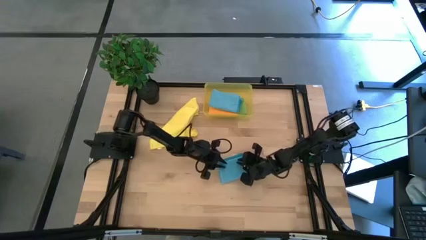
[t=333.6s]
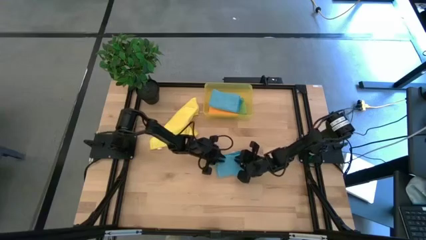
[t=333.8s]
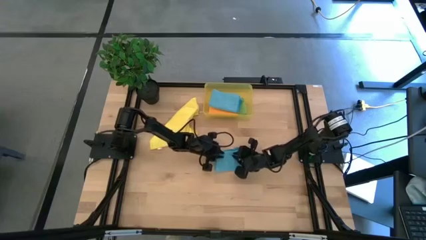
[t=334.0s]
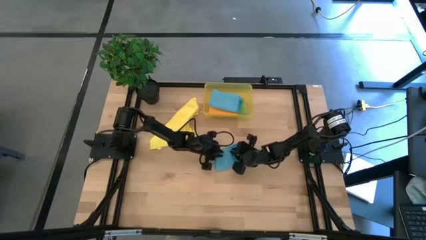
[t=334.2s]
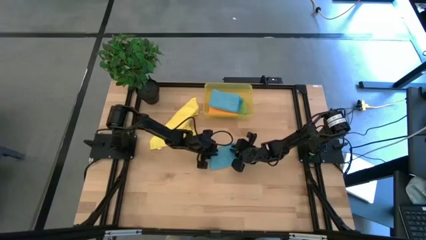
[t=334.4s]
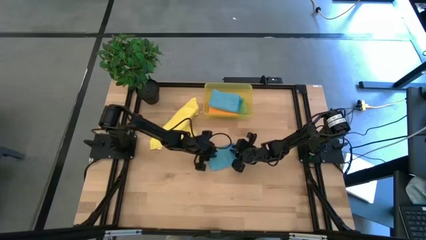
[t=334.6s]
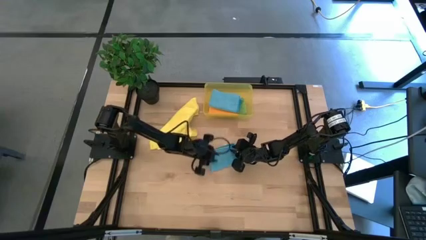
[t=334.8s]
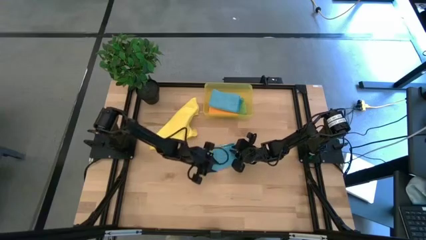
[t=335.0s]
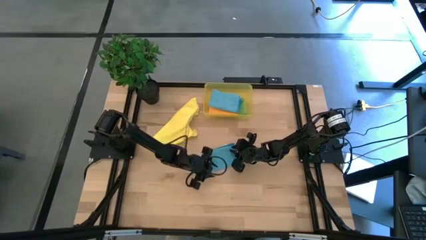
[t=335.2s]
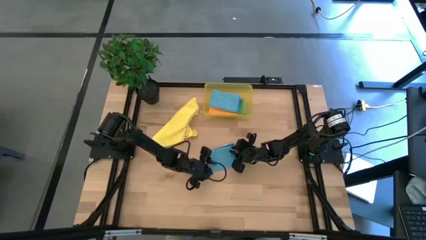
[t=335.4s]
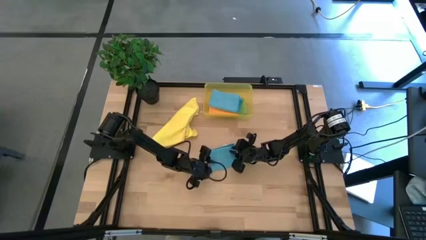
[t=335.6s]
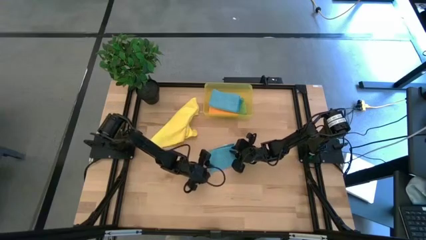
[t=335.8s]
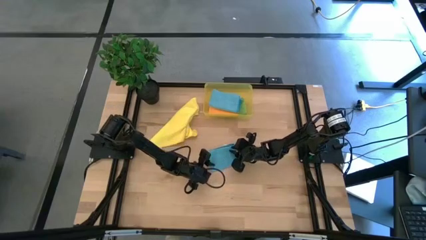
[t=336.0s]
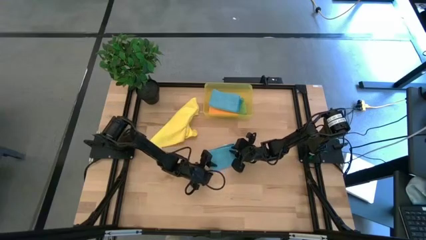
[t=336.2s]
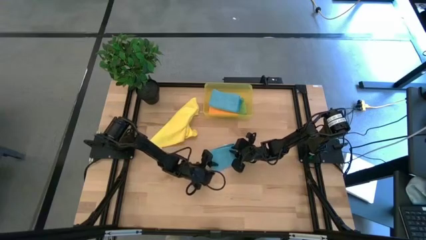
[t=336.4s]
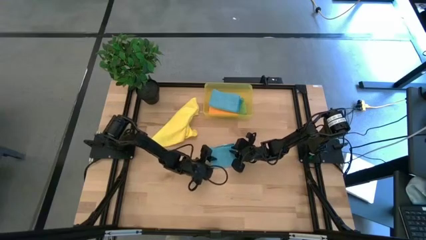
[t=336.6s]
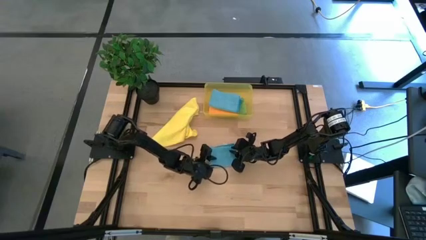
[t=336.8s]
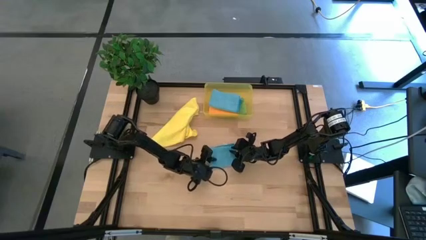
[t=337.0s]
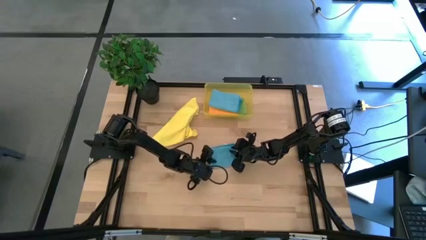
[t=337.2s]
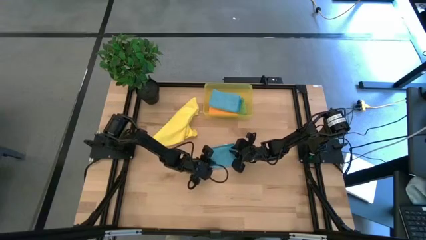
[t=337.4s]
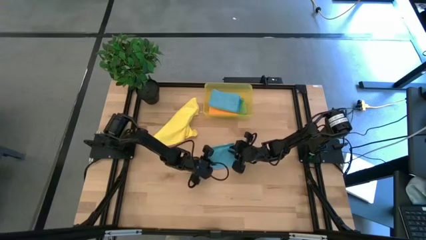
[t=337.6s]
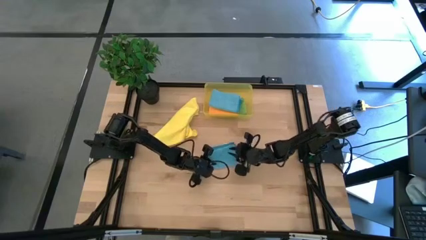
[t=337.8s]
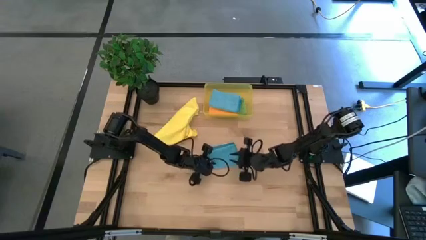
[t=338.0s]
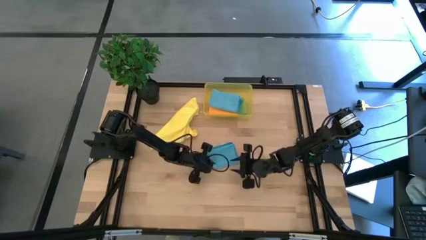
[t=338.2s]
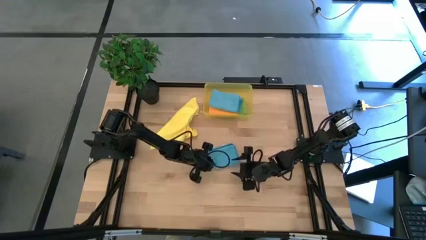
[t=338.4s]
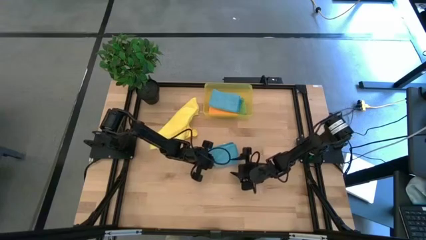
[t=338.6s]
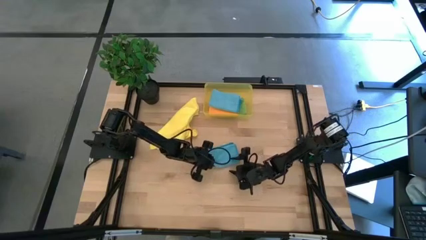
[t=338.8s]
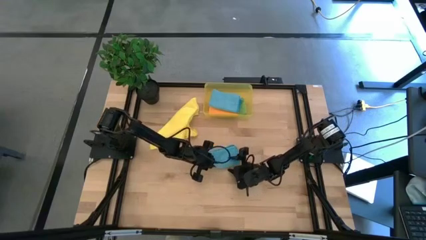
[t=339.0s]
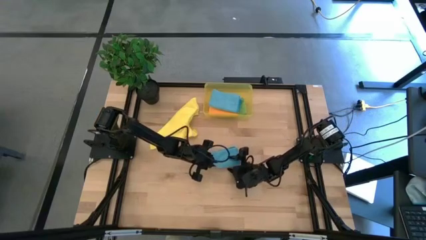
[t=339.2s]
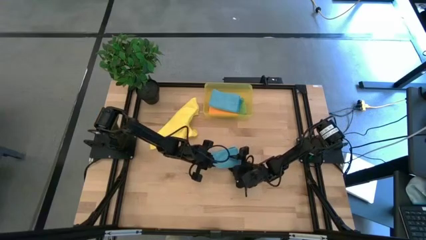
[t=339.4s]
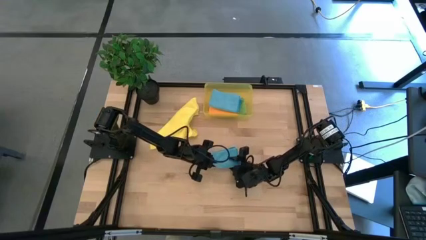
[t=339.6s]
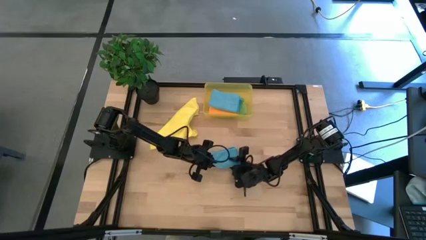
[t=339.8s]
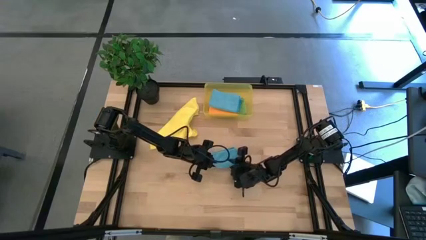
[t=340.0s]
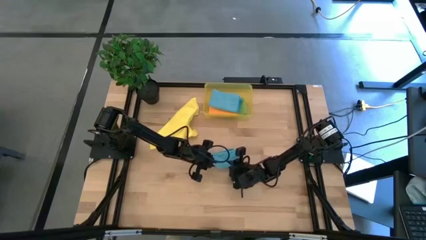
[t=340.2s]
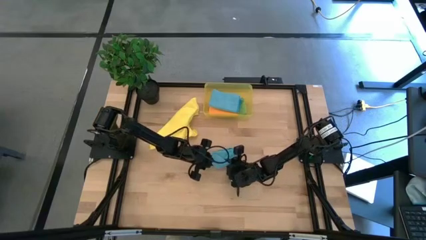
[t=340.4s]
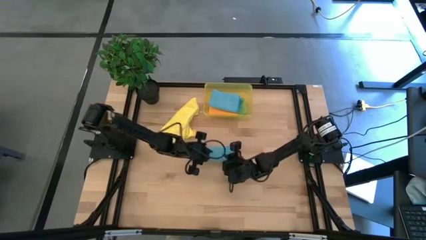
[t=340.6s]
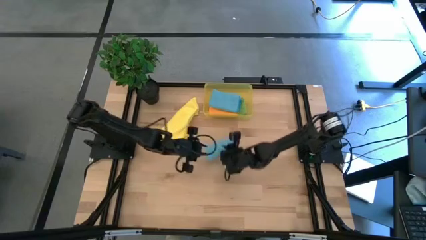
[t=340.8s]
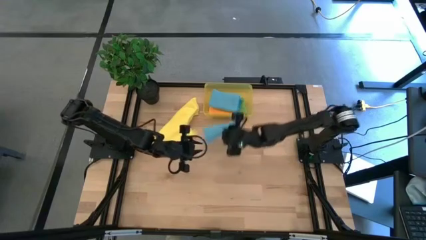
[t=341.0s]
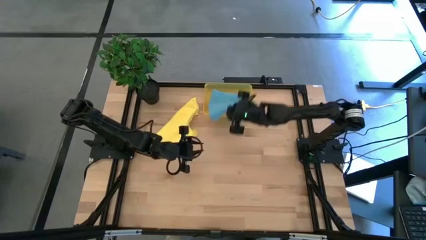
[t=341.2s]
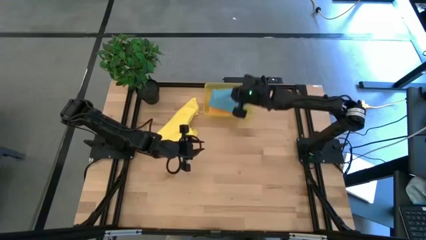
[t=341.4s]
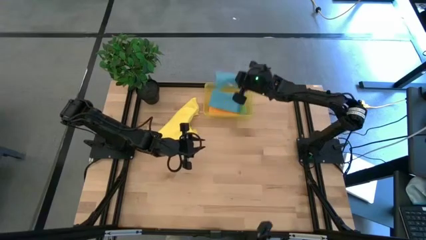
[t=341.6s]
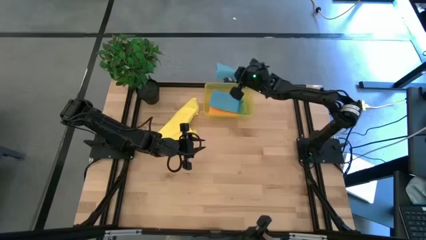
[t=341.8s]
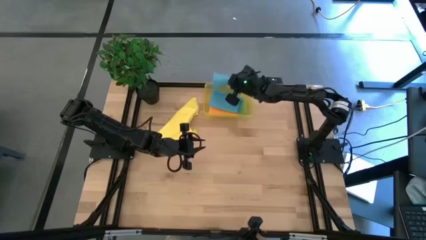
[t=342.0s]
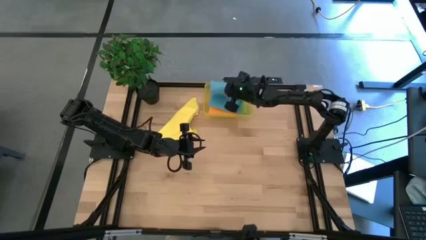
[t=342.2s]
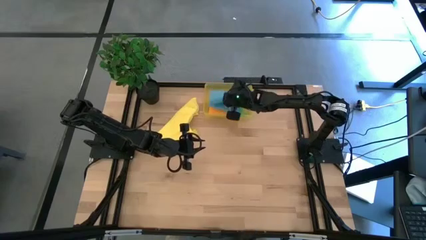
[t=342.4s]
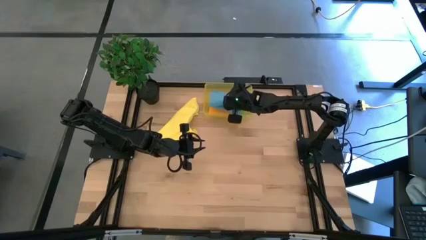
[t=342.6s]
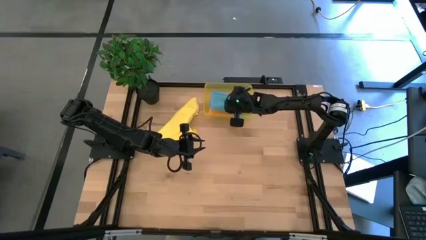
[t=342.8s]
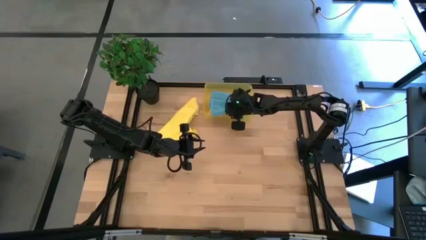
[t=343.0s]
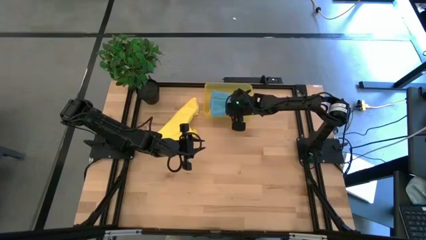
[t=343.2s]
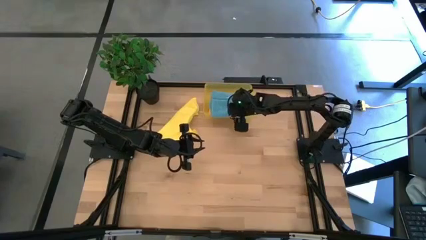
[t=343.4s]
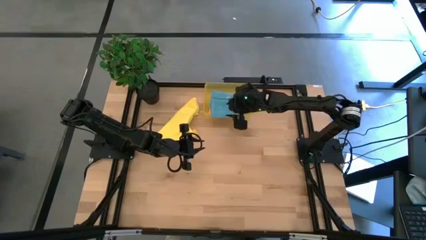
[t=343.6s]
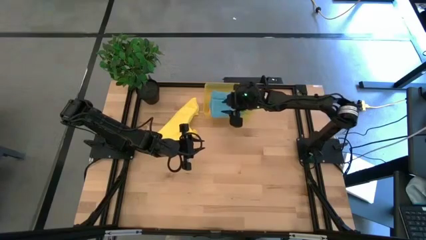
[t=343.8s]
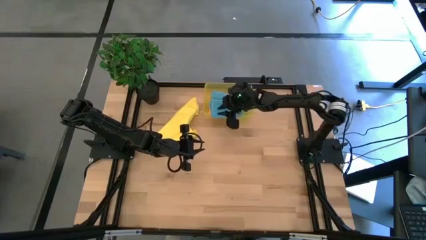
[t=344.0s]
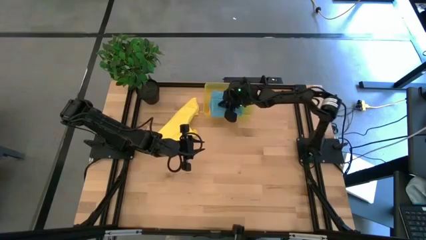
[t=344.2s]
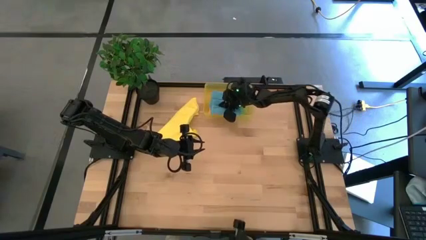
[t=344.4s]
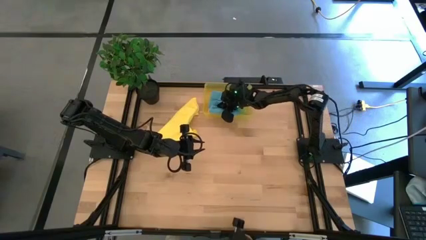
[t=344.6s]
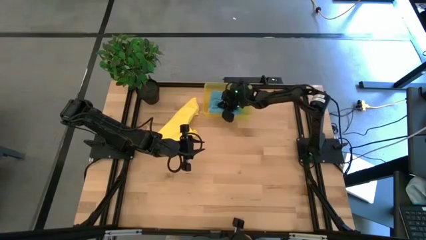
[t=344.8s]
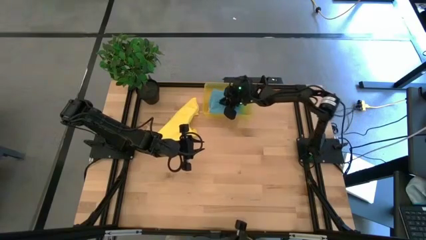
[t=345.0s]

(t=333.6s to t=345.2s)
Task: Fold microfiber towels
Stack the folded blue microfiber cloth on top of the blue microfiber cloth

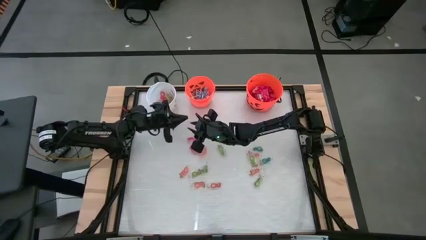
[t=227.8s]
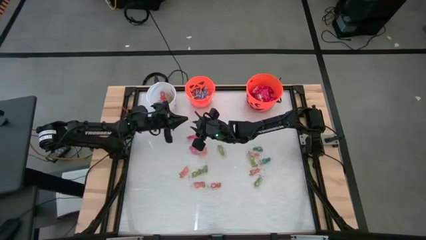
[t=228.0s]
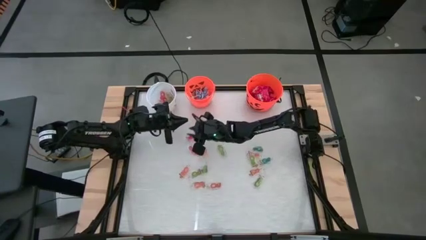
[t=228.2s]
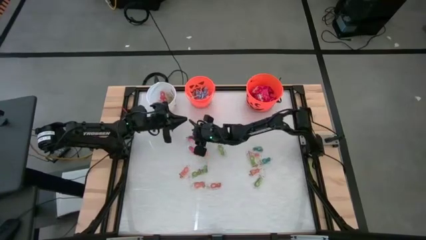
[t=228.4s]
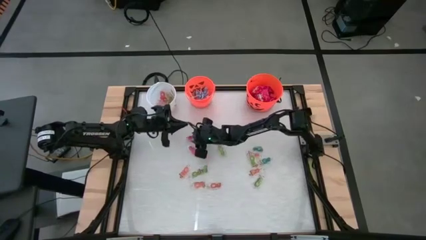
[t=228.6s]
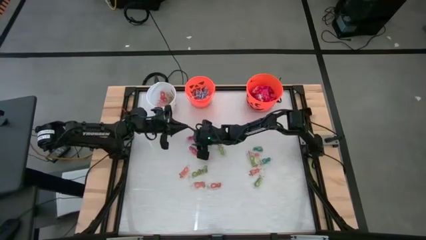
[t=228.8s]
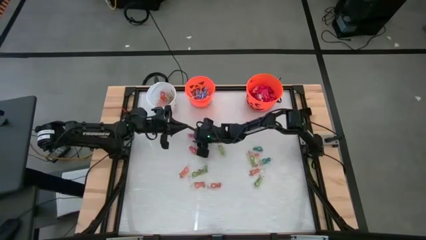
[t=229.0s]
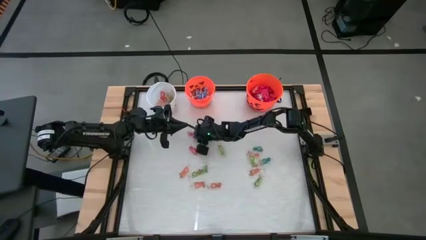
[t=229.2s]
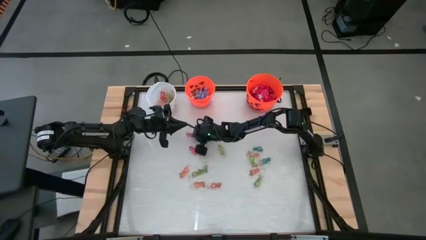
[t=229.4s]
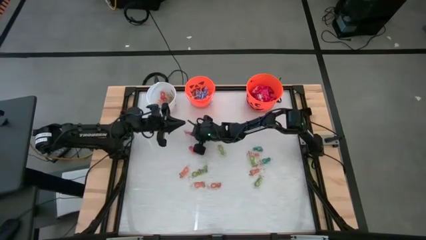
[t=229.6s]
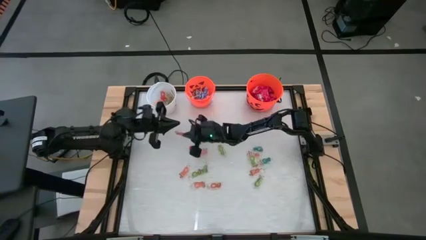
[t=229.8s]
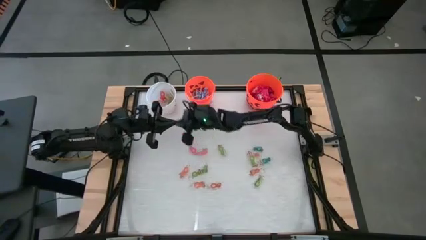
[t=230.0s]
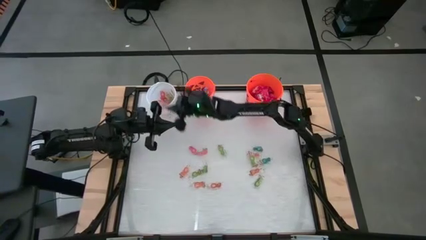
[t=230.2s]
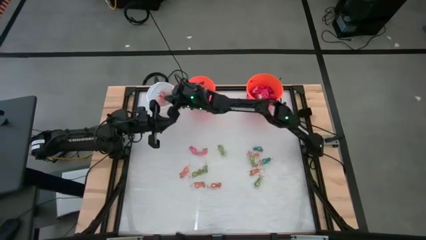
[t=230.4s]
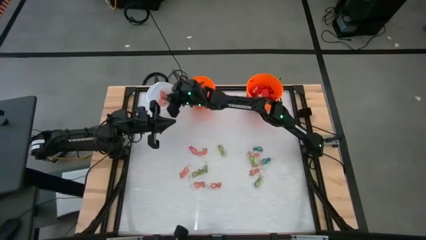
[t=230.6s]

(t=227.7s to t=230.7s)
Task: Sort candy by brand, put in halloween buckets
Put the orange gummy into the white bucket
